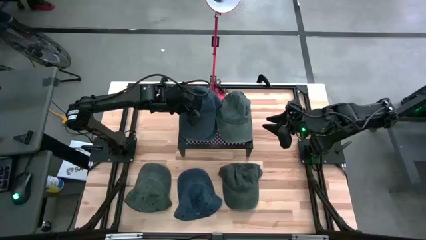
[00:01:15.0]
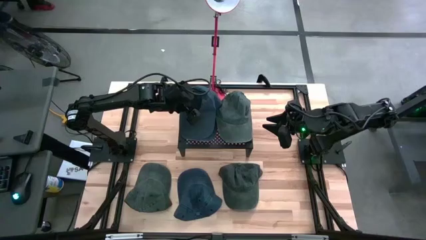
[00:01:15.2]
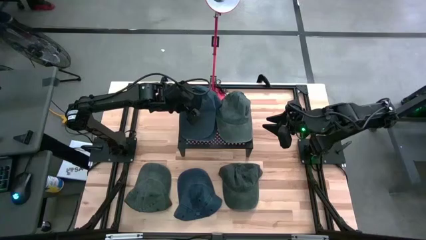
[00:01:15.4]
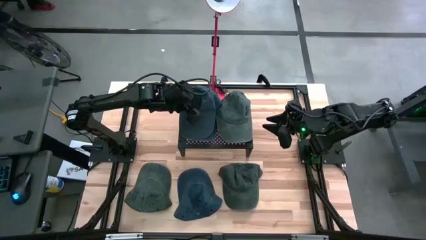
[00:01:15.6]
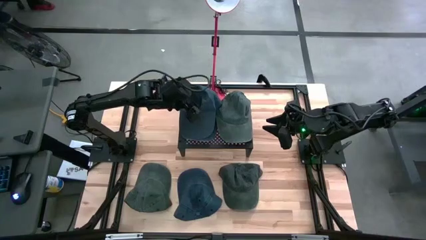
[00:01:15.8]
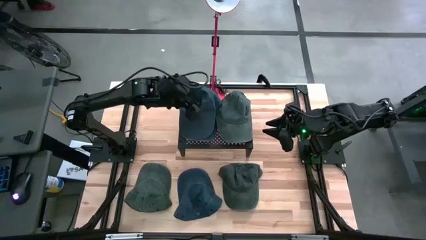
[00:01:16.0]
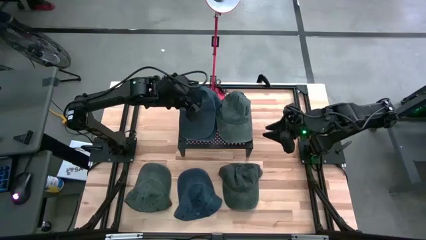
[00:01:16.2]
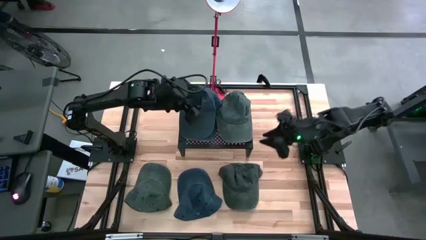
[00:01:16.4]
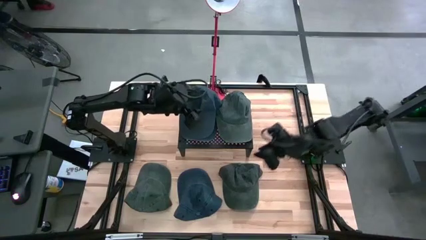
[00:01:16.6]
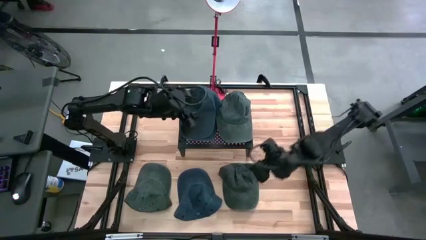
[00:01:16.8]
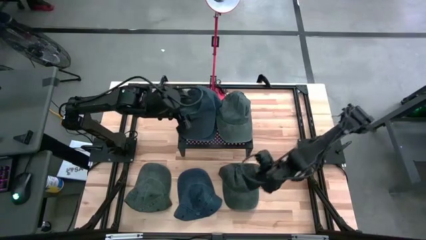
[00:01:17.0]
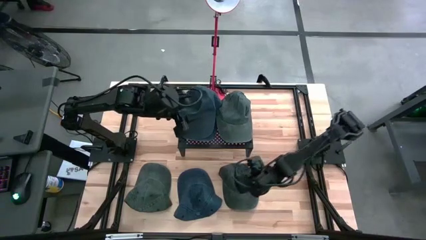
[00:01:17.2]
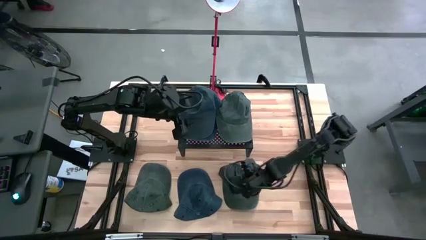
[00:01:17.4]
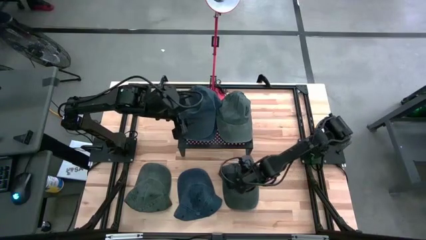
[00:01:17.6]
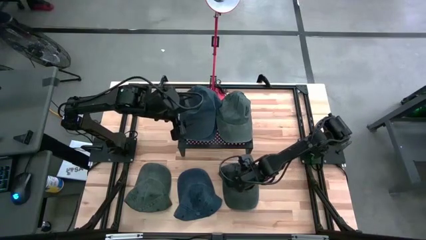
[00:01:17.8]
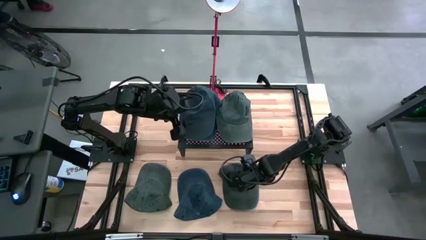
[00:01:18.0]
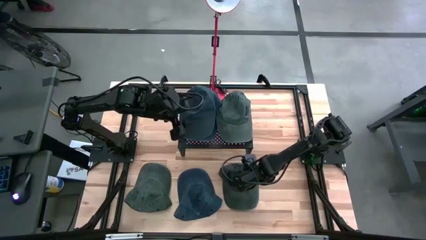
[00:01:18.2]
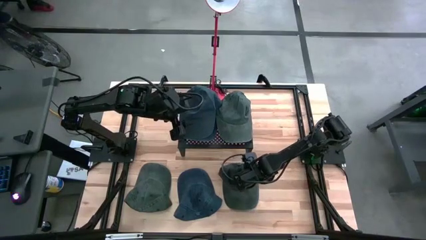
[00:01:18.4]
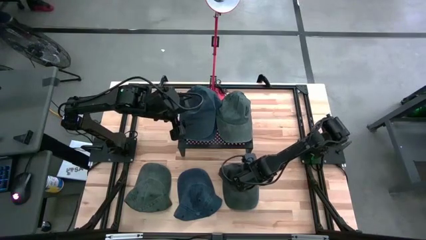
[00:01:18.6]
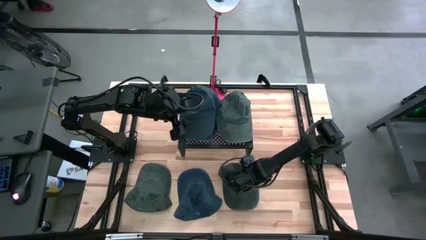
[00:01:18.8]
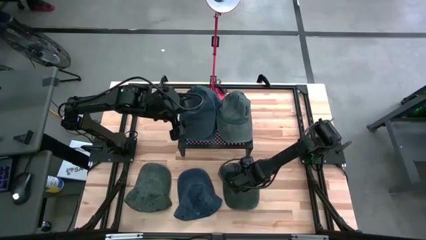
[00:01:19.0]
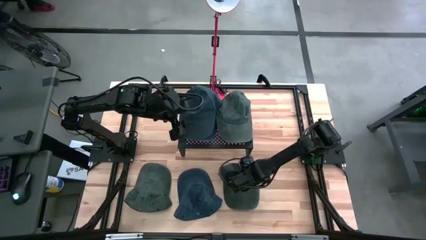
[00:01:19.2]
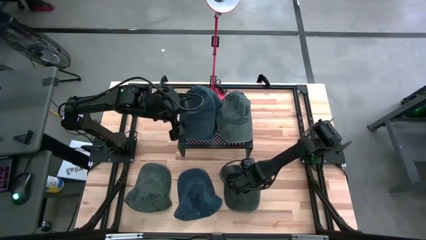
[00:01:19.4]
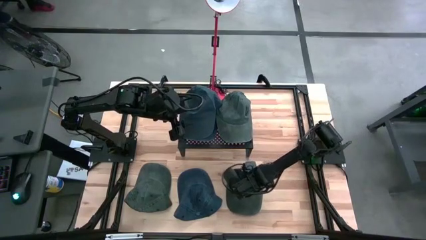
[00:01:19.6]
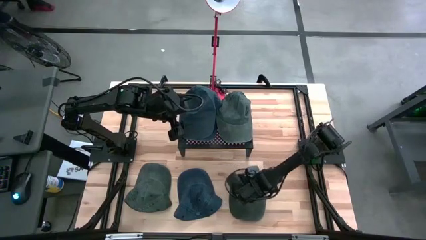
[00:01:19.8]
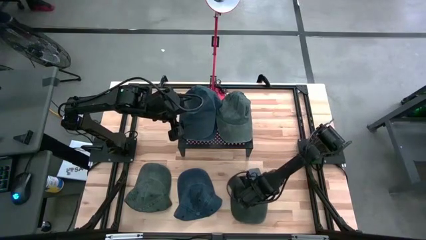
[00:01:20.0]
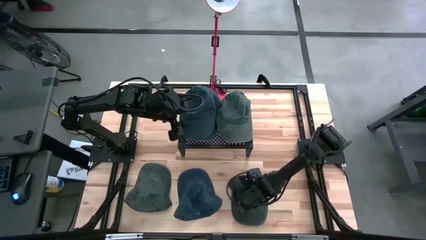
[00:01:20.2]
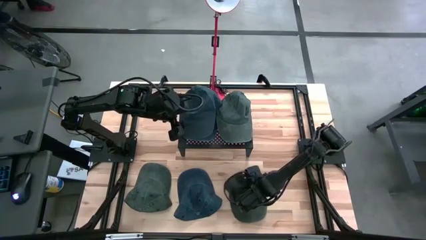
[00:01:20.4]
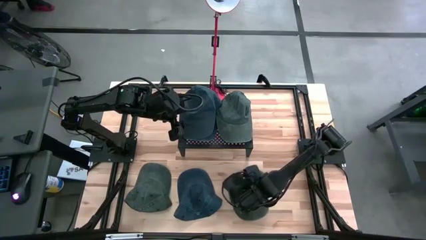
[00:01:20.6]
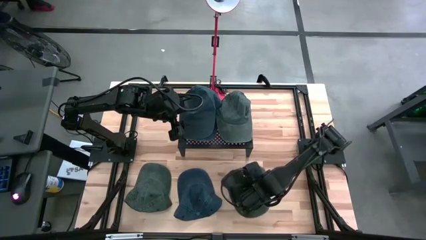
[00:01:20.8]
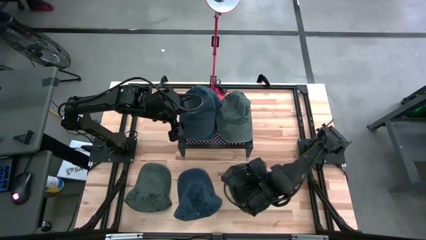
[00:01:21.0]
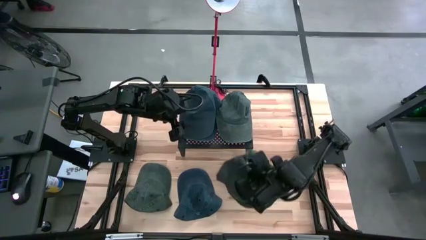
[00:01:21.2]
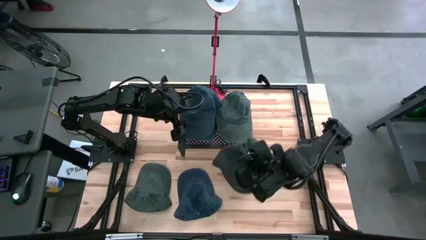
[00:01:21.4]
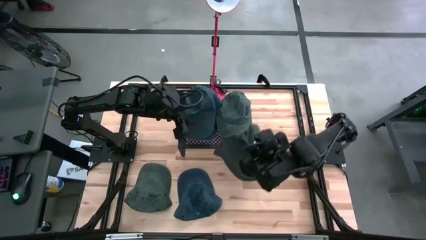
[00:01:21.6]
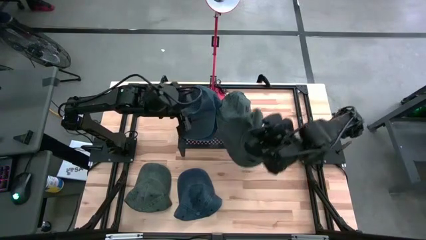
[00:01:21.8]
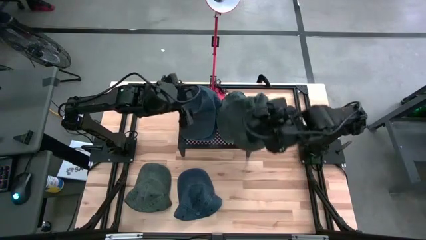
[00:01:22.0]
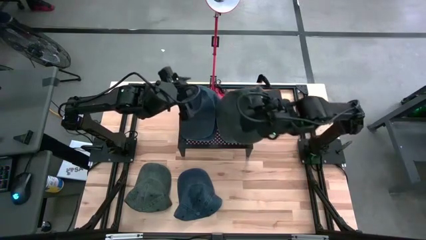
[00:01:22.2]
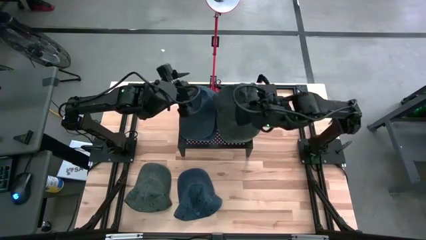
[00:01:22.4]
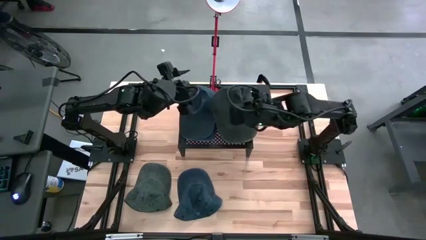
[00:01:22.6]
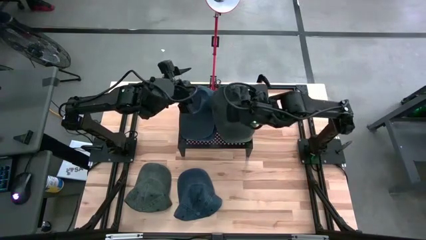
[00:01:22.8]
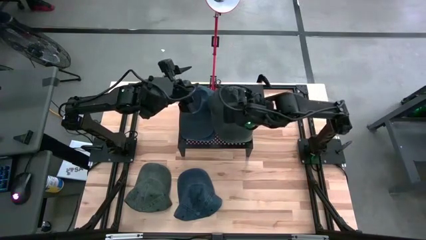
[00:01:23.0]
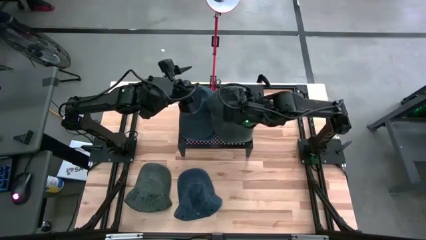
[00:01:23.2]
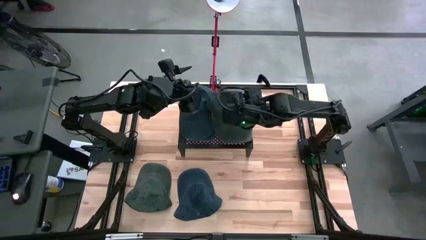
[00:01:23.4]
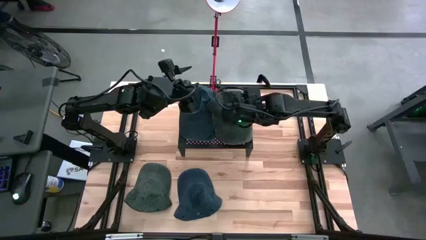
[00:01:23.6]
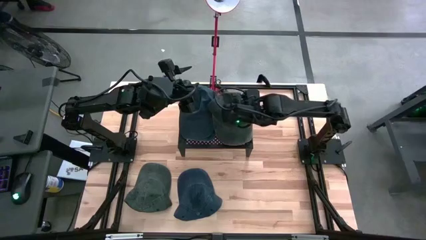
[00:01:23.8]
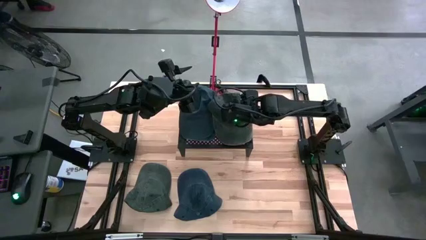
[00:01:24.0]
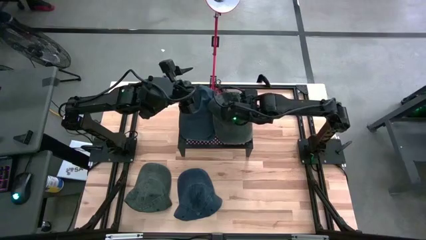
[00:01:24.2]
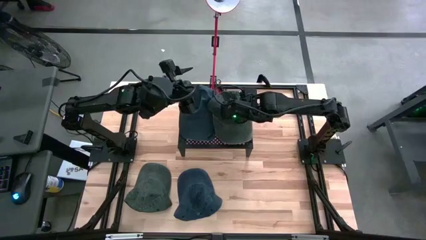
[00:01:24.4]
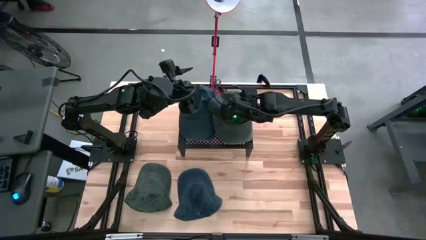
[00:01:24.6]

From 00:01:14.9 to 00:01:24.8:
Task: Pick & Place hat
Stack the left gray cap on top of the gray cap on the shelf

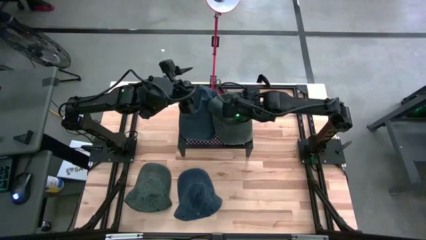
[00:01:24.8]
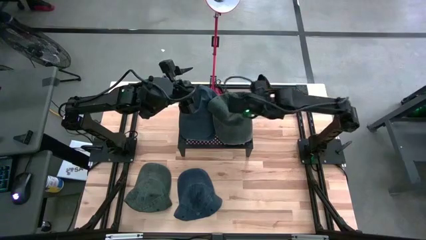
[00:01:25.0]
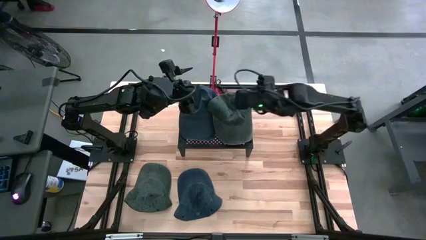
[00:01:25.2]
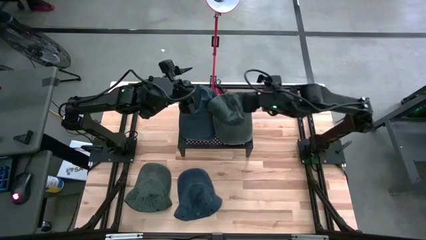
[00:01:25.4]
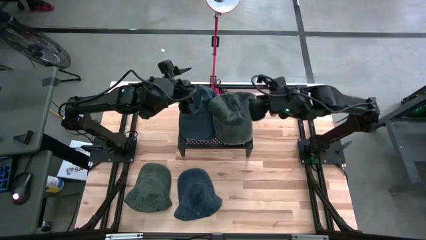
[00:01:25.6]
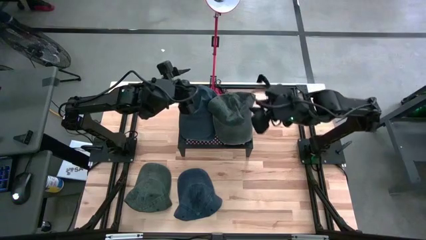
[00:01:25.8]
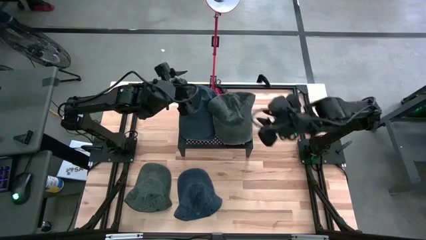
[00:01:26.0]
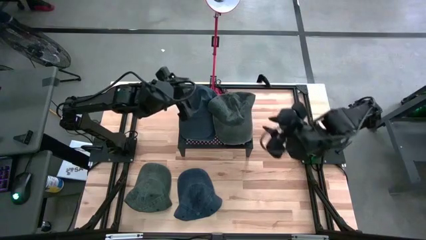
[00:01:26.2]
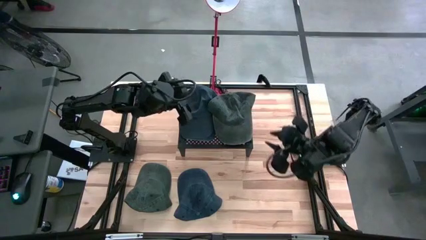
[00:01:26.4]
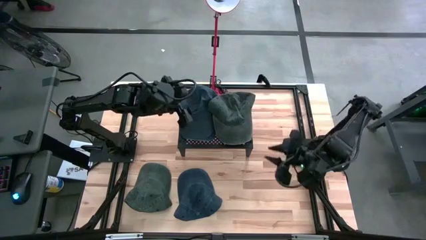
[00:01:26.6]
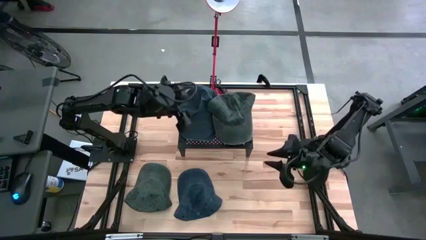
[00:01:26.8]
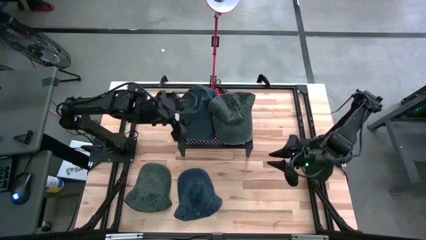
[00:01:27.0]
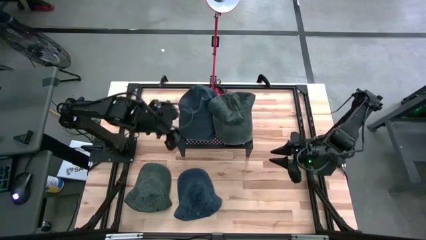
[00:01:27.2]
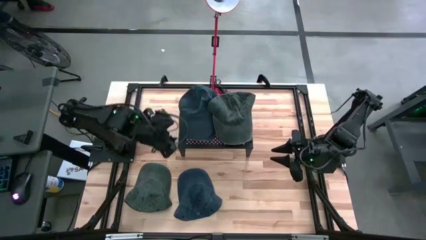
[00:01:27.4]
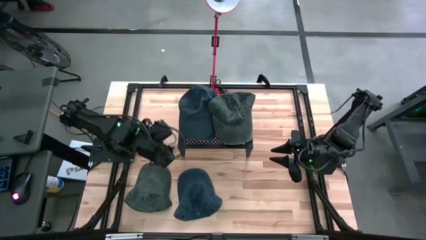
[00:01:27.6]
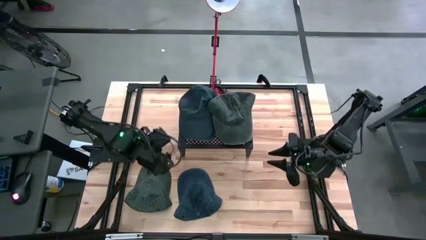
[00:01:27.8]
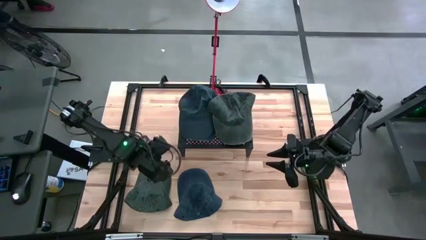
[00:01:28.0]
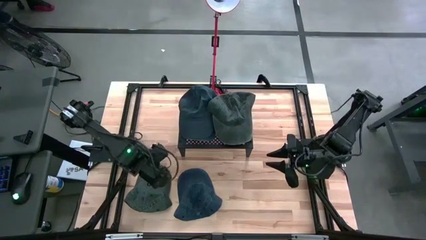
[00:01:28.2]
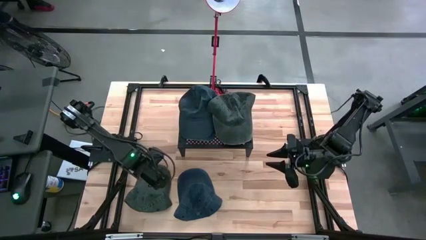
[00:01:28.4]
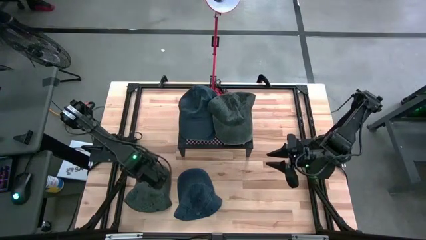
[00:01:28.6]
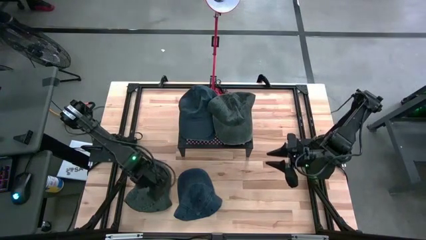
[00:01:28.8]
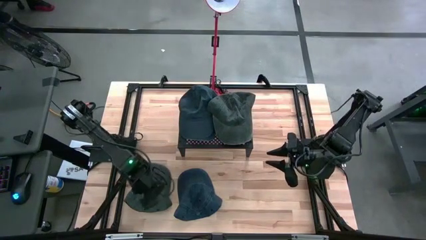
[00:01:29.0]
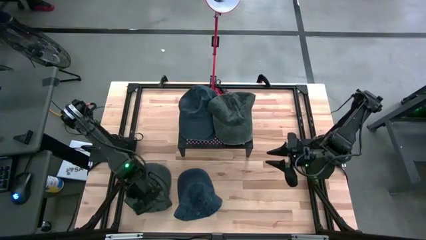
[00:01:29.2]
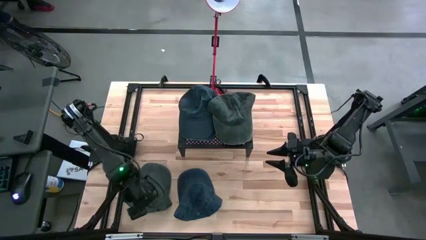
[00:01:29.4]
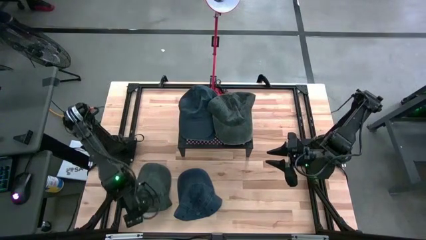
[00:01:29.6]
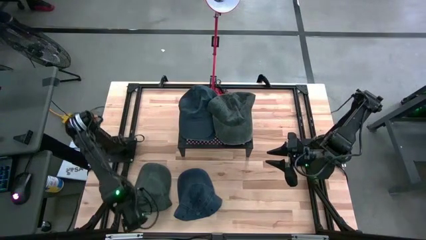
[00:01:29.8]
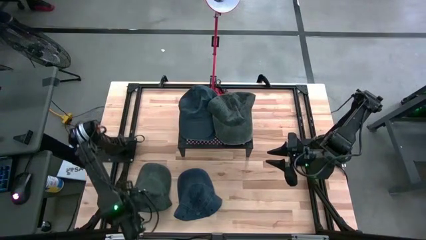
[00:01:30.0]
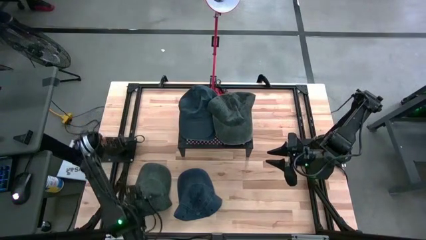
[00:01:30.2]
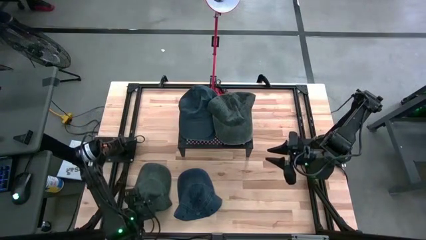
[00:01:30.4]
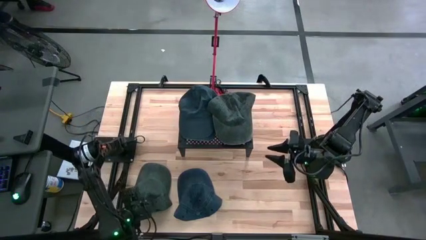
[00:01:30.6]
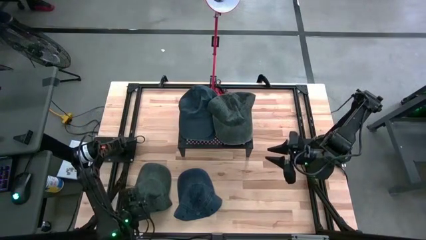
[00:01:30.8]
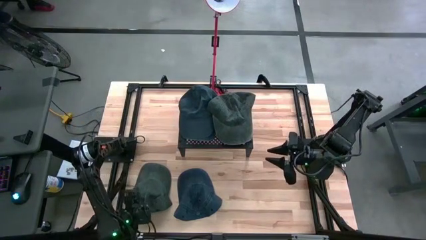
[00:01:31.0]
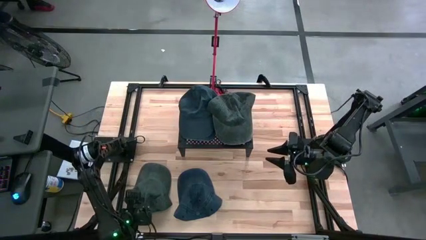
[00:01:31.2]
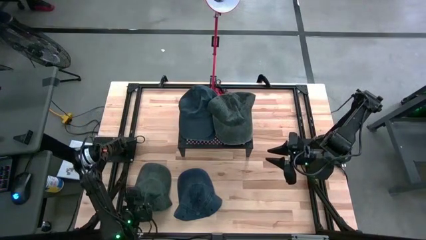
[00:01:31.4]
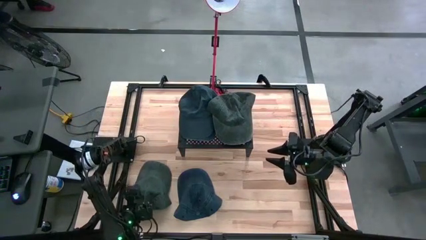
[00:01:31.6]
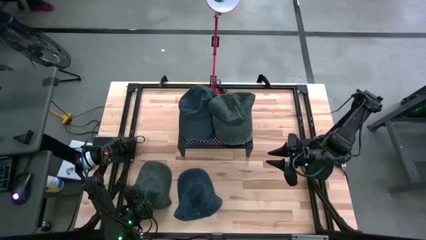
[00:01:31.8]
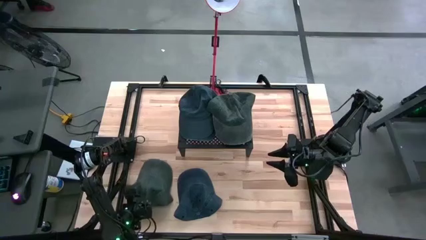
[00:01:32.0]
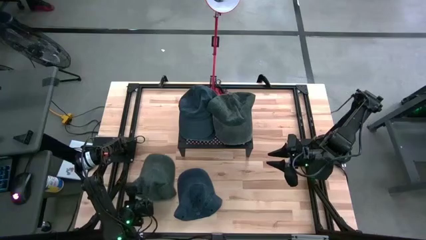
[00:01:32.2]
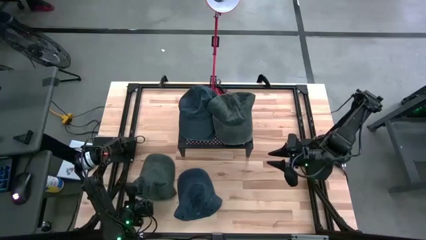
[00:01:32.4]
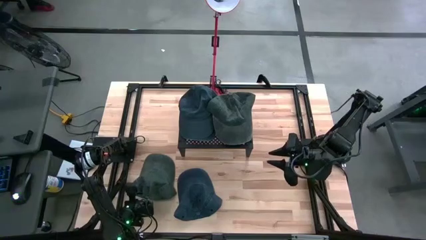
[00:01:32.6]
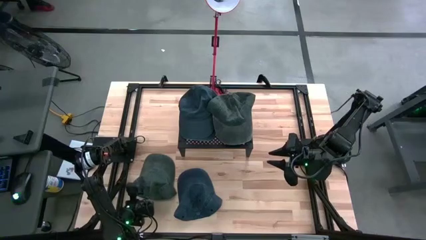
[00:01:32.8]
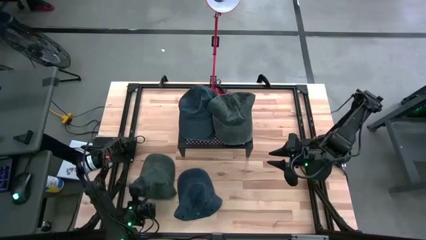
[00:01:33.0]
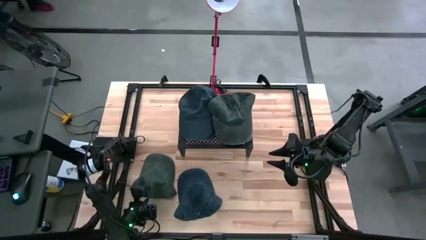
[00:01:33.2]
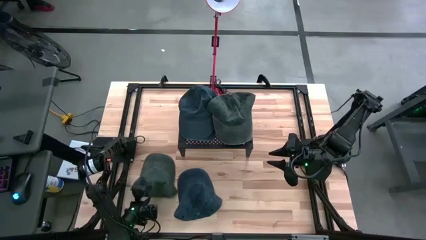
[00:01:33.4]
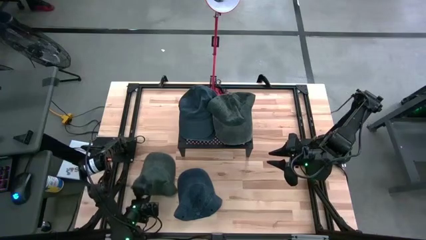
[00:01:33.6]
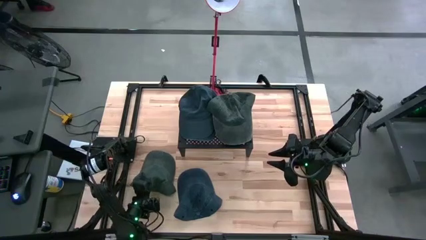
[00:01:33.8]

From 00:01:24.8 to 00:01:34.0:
Stack the gray cap on top of the gray cap on the shelf
